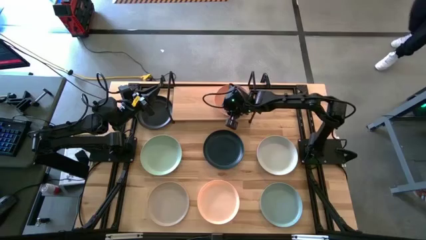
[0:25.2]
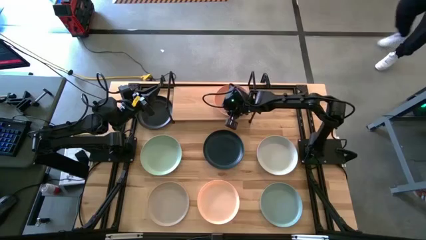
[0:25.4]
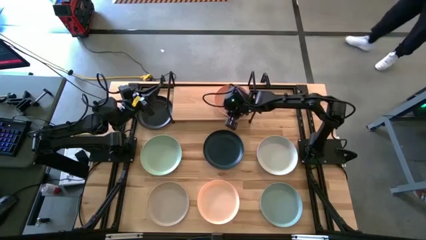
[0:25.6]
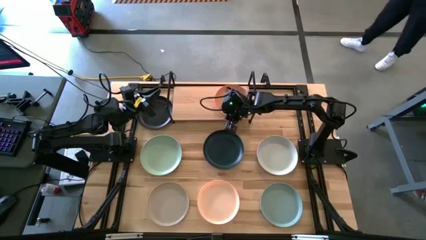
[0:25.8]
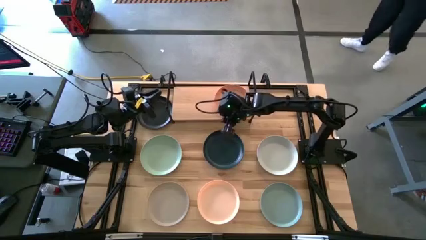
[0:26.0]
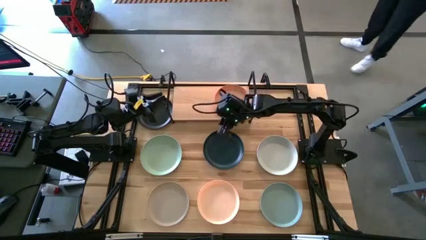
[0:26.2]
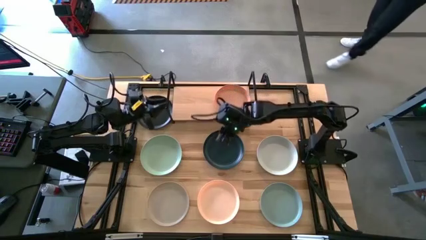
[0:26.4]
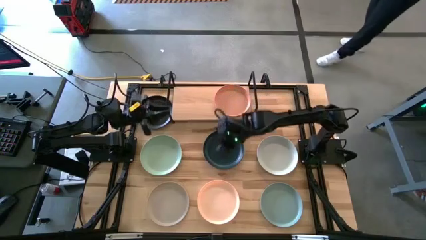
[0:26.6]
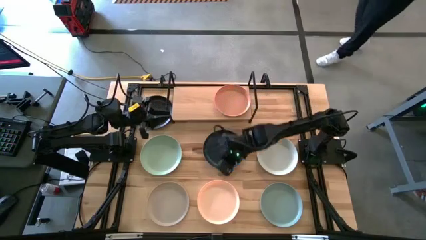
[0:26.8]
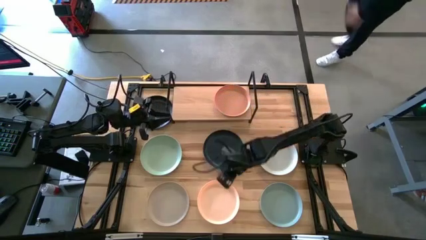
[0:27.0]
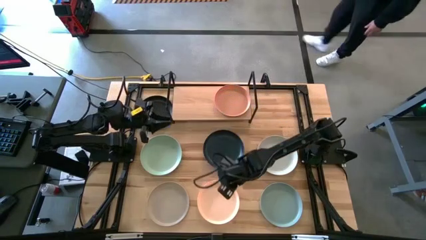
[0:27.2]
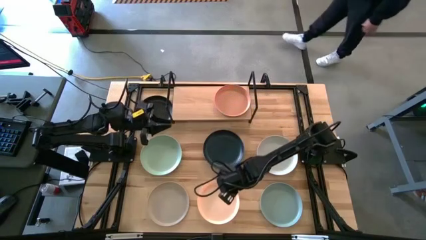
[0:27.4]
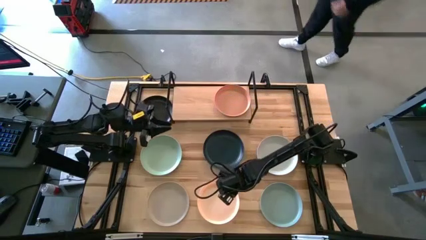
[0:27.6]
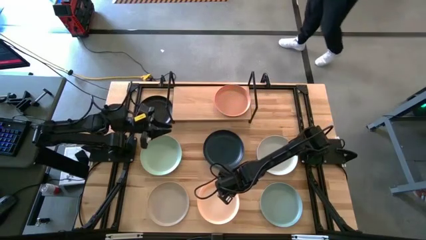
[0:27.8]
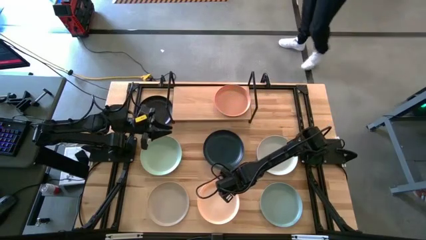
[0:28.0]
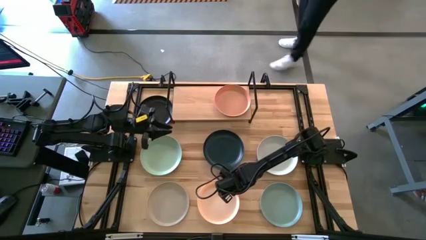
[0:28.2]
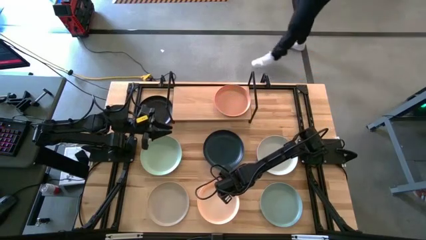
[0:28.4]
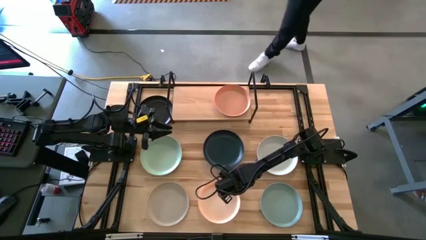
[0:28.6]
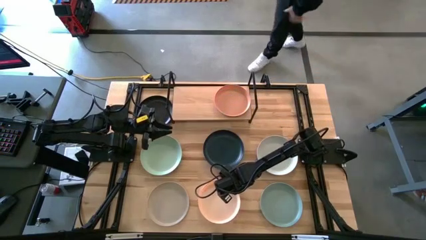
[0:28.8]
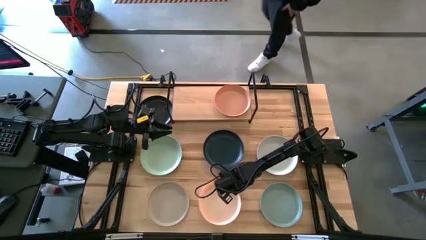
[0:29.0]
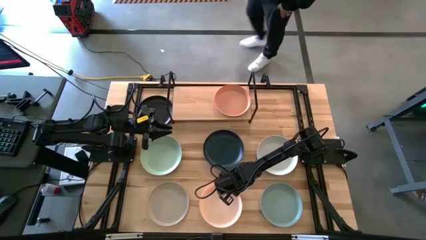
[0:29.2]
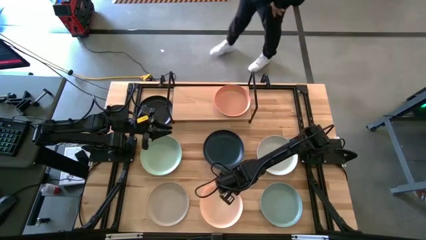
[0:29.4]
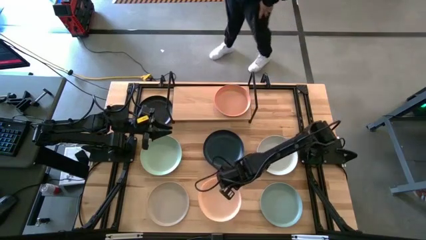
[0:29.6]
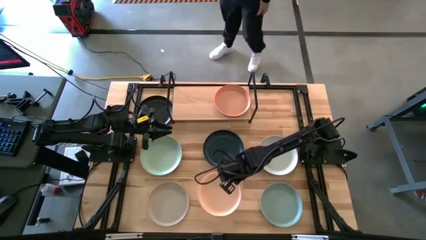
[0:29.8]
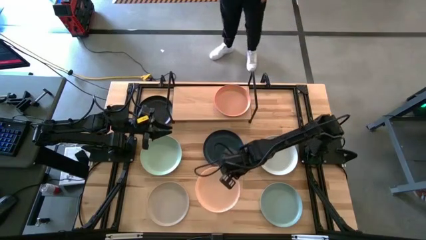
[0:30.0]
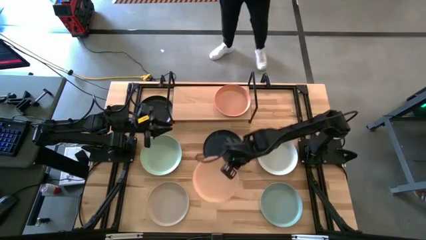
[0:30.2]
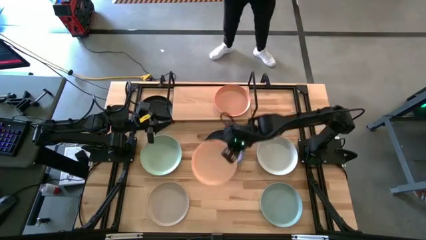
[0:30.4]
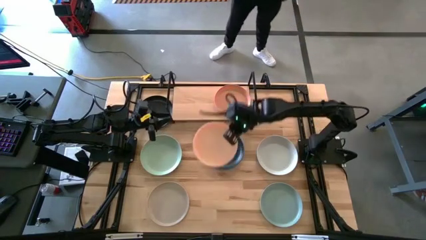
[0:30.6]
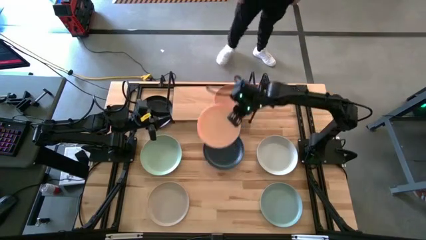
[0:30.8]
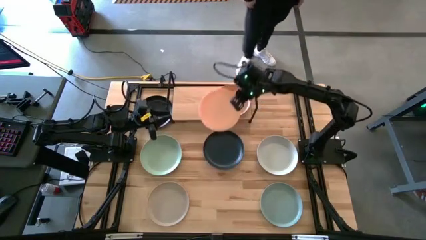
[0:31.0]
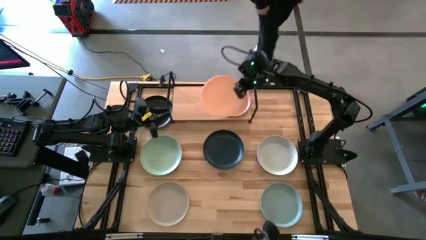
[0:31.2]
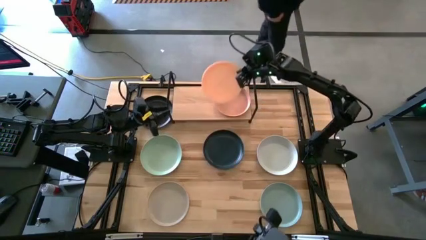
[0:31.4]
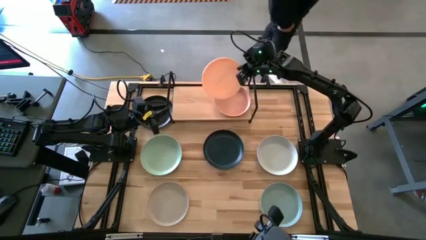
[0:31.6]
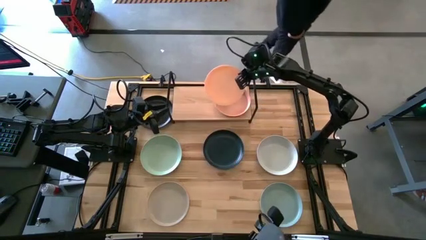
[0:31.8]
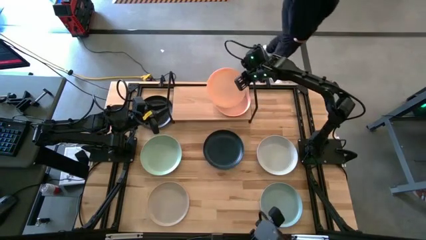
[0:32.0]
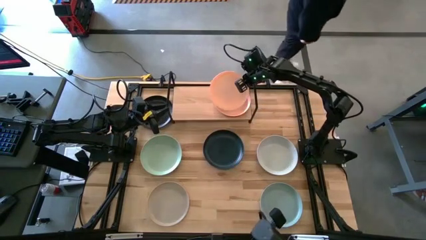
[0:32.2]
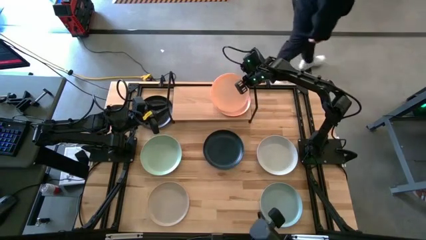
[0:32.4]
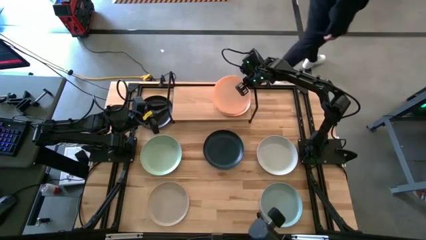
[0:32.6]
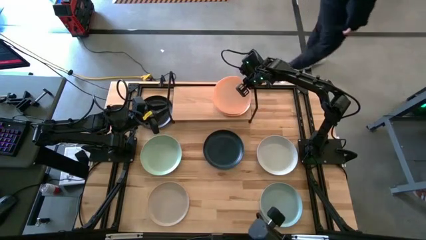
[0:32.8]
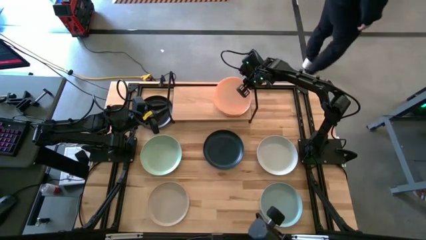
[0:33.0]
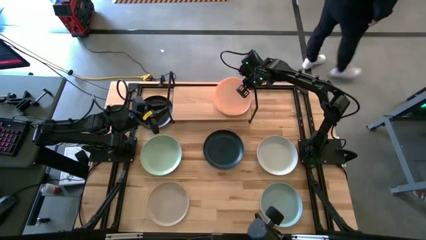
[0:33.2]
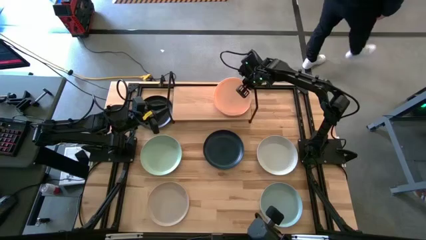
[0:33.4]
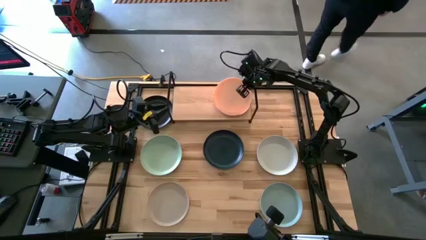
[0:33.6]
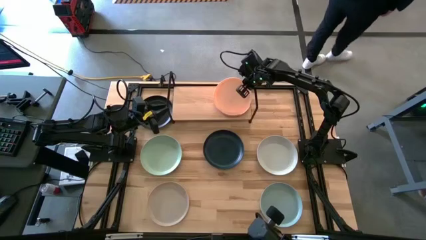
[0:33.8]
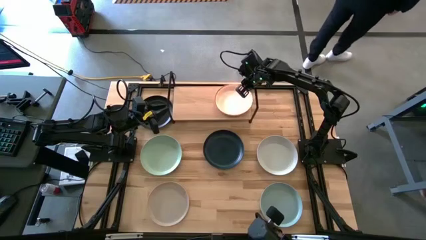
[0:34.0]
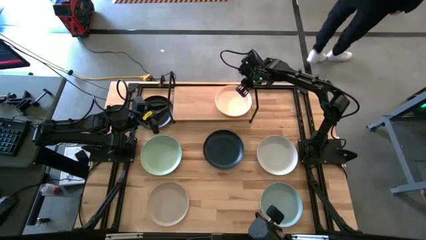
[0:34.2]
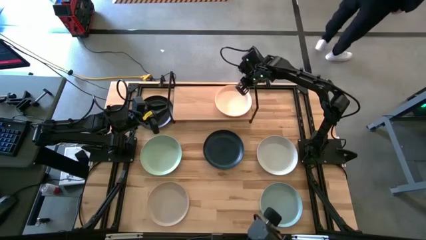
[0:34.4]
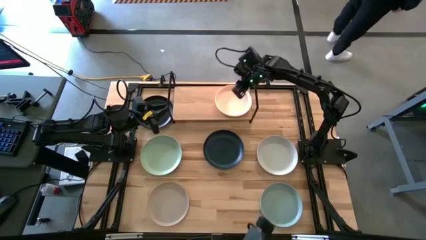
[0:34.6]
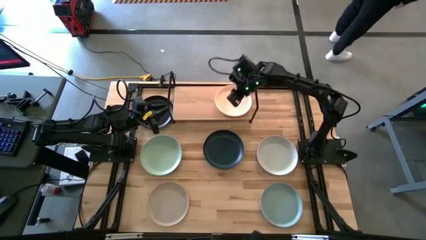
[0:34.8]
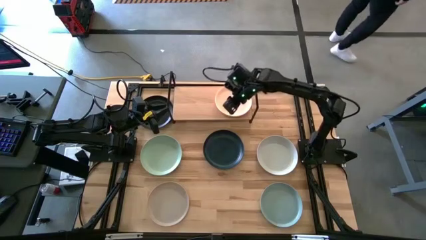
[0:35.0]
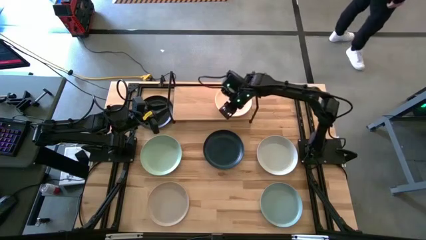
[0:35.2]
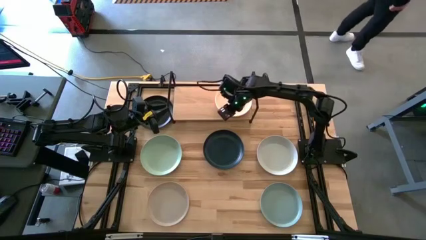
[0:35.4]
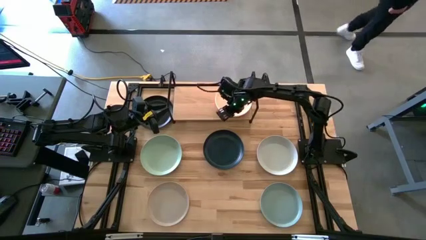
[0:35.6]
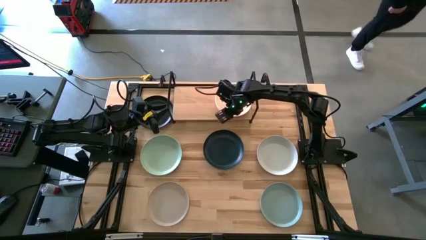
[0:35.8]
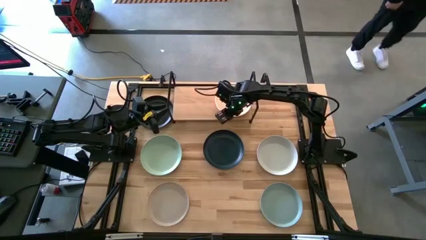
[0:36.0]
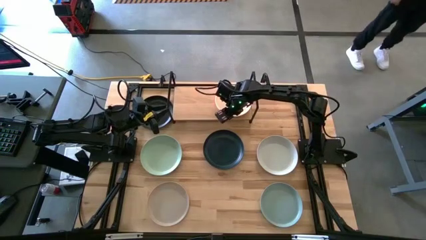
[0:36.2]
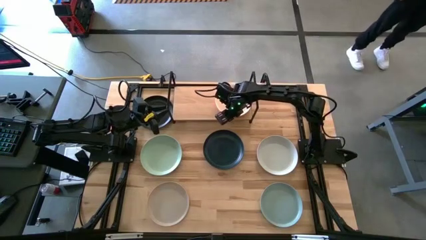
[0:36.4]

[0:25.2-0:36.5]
Task: Place and stack plates onto a shelf
Stack the light brown plate on top of the brown plate on the shelf

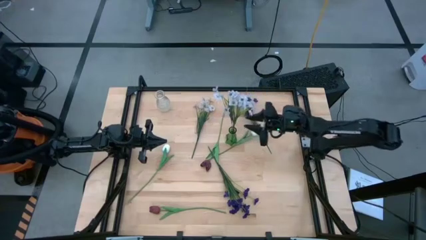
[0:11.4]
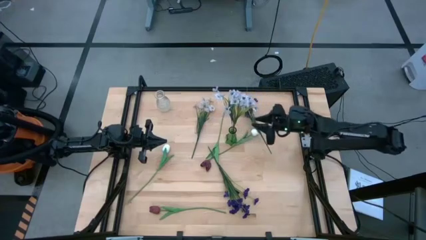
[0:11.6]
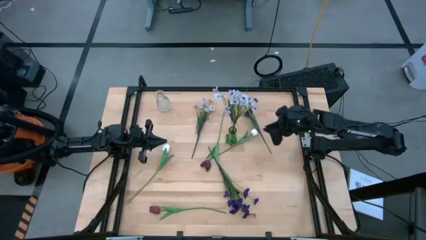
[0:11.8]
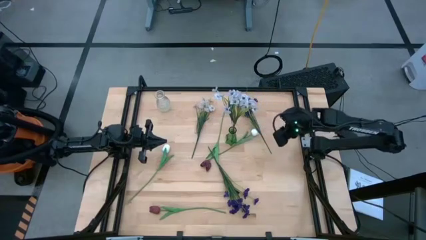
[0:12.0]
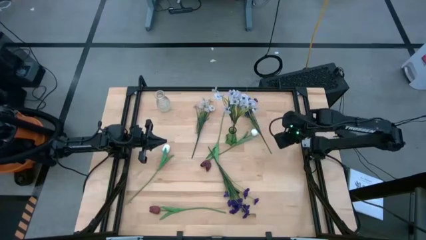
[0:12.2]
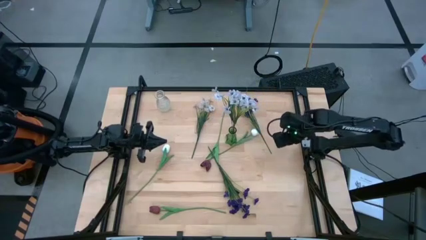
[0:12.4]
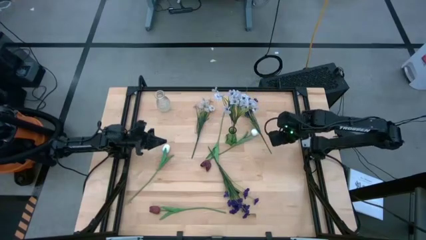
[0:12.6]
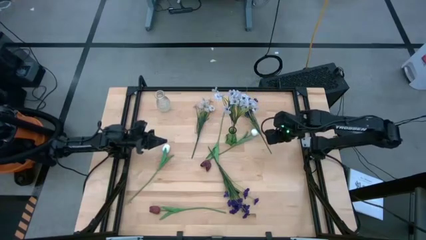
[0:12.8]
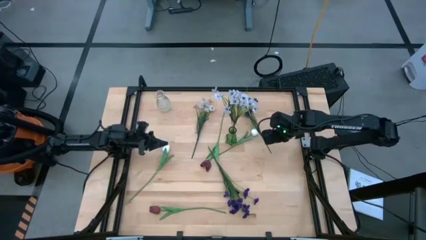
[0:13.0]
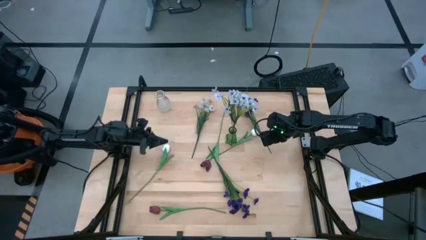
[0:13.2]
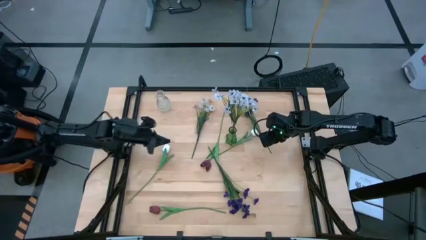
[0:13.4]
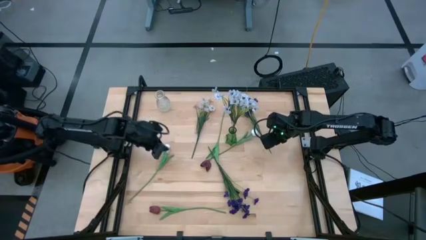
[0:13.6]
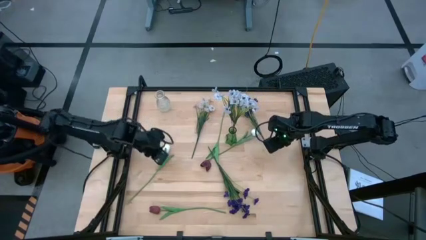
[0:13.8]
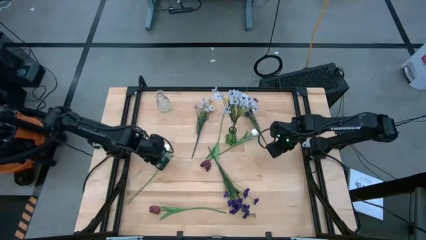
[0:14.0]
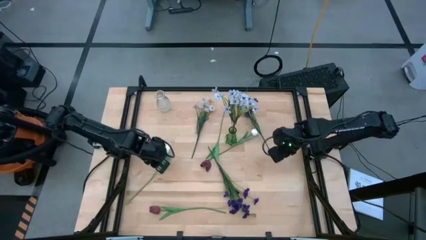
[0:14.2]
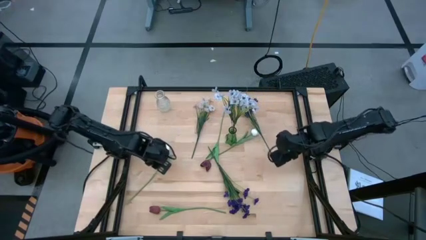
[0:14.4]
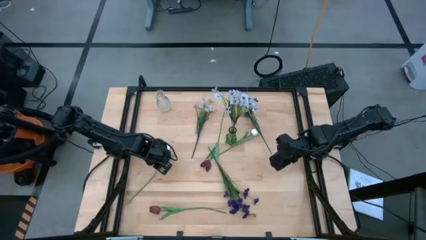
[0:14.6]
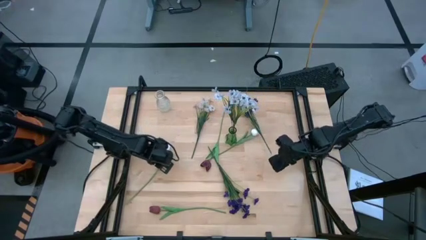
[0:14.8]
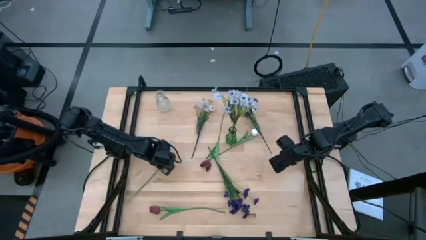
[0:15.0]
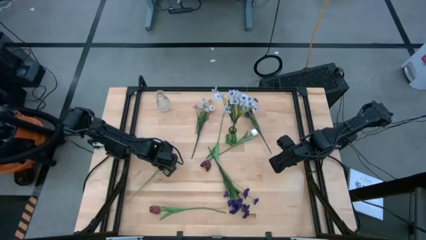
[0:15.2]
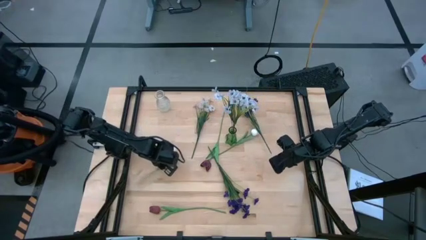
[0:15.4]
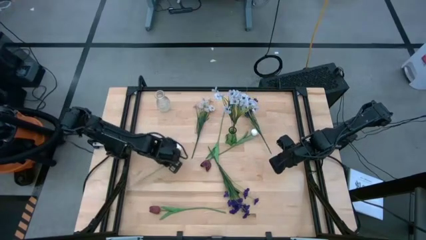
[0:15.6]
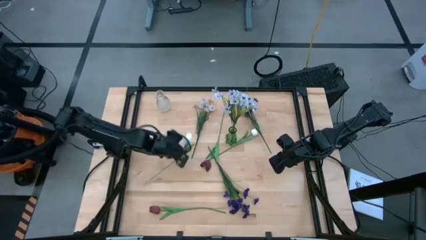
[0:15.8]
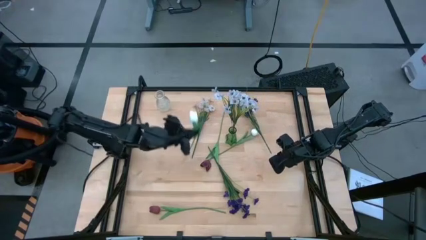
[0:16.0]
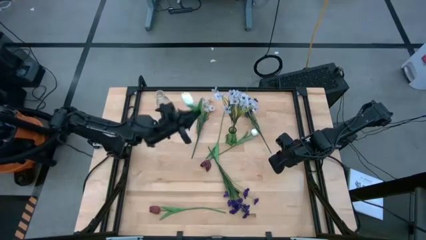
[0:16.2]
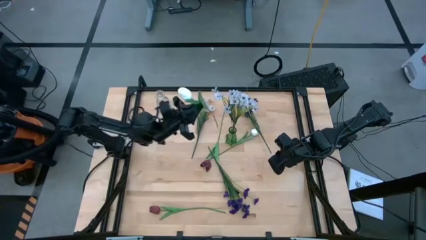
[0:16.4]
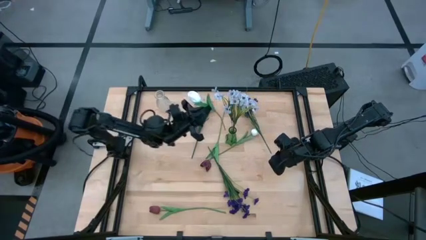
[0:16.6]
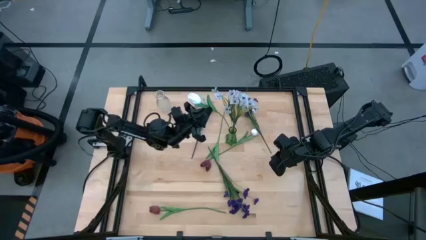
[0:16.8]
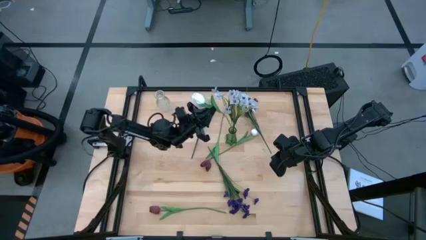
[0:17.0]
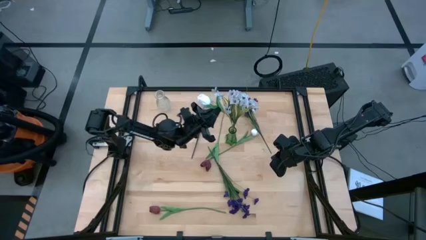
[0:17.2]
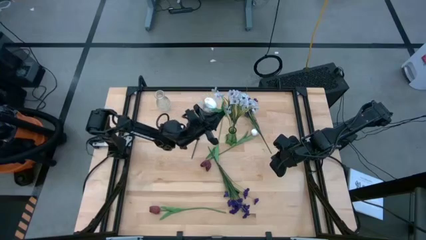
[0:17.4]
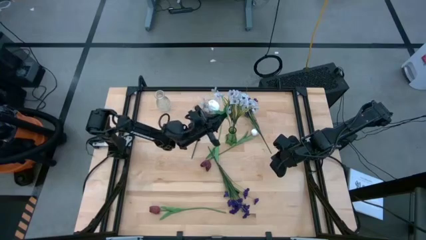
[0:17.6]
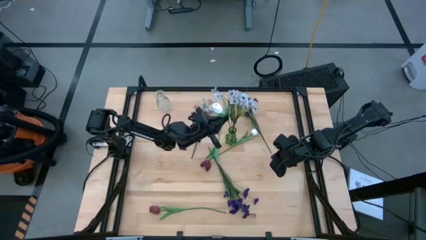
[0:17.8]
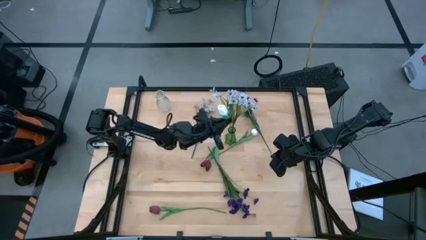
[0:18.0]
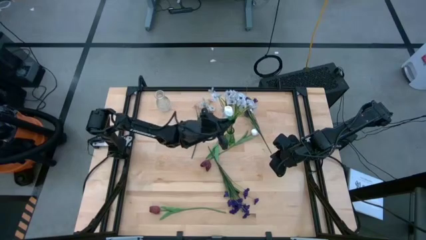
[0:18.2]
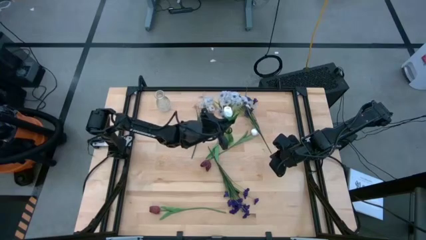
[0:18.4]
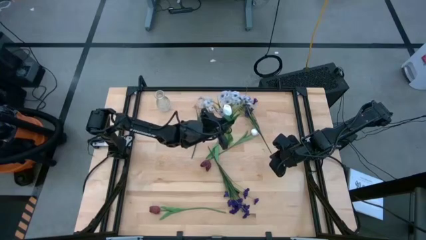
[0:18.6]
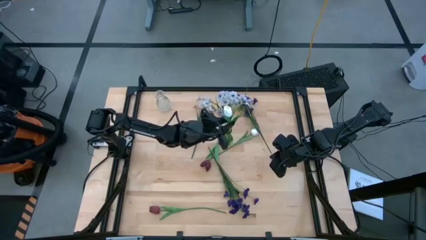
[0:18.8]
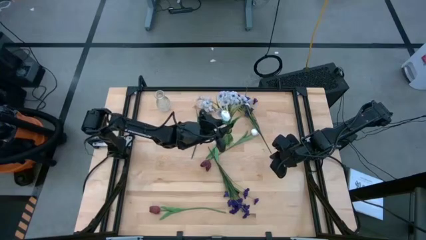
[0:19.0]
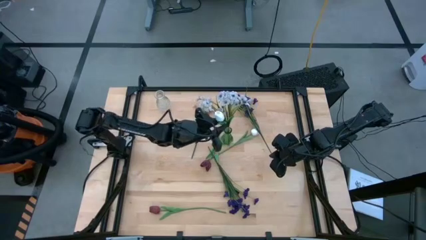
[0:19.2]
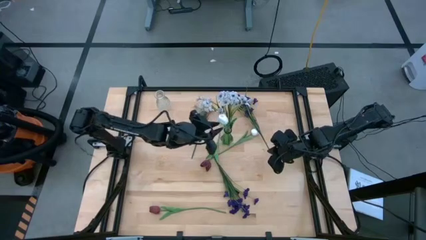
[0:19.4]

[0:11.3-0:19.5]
Task: Sort flowers into vase by color
Put the bottom white flower into the green vase
